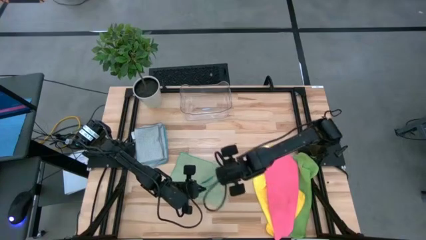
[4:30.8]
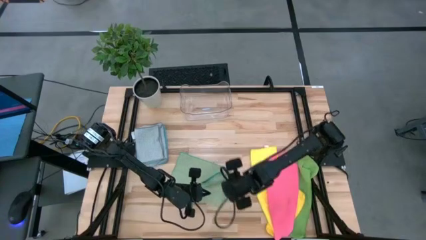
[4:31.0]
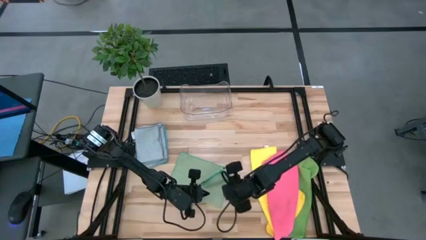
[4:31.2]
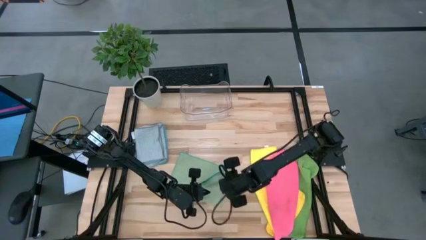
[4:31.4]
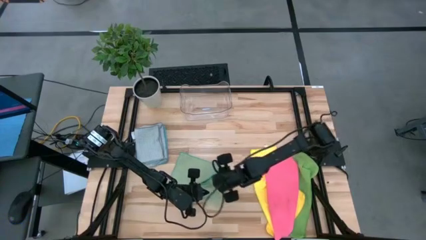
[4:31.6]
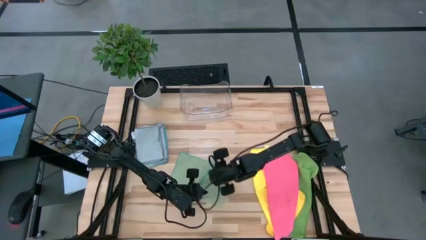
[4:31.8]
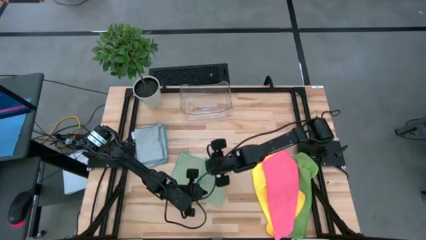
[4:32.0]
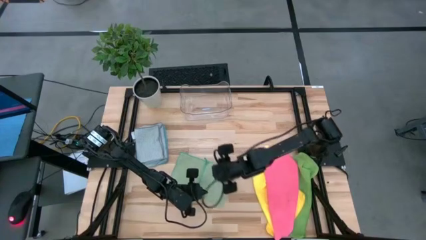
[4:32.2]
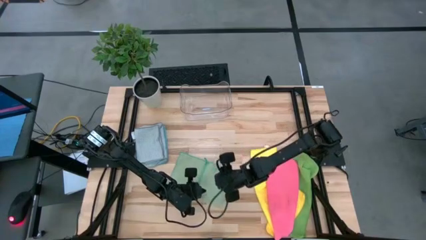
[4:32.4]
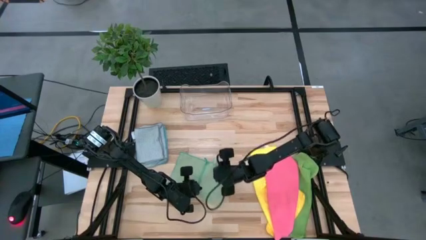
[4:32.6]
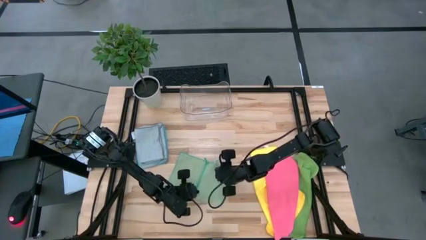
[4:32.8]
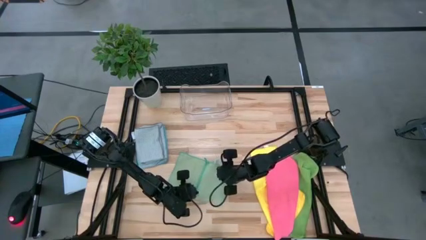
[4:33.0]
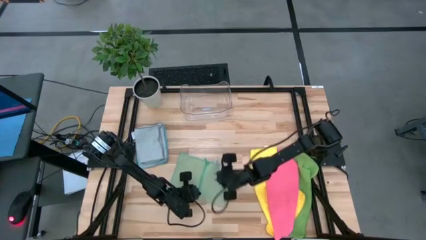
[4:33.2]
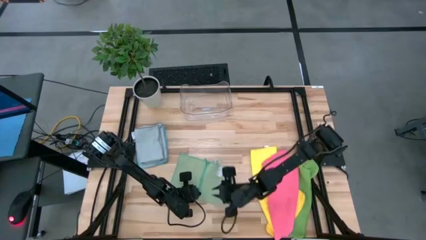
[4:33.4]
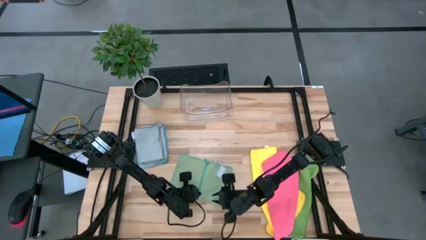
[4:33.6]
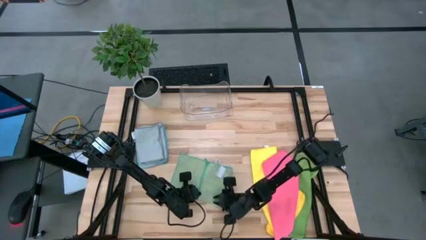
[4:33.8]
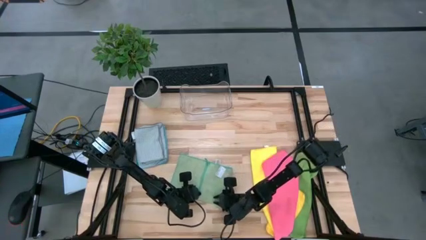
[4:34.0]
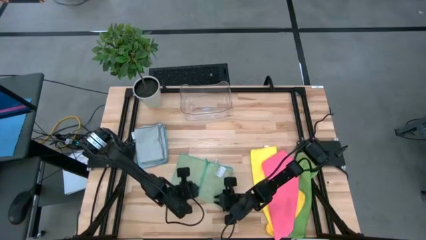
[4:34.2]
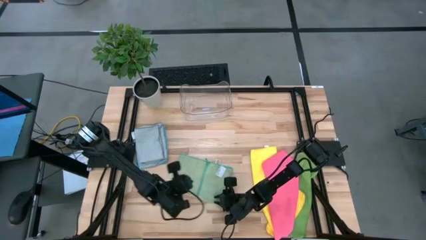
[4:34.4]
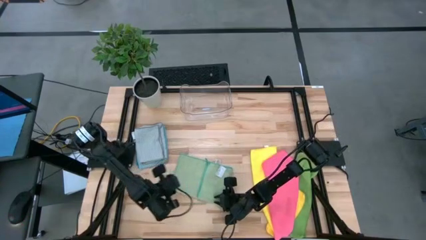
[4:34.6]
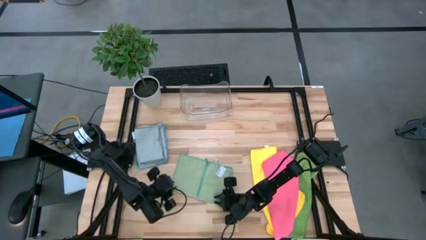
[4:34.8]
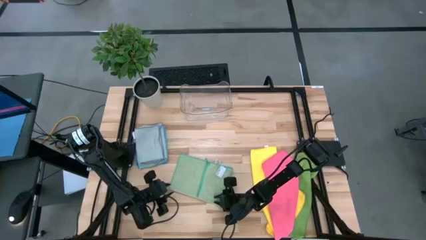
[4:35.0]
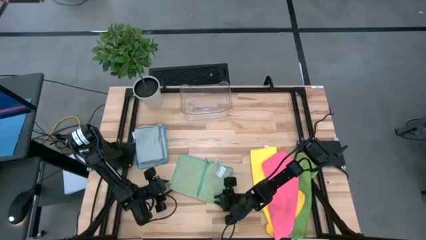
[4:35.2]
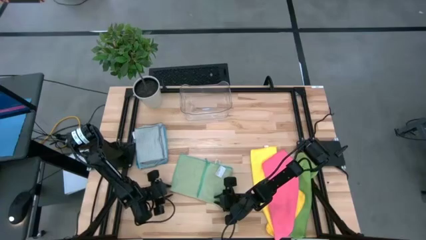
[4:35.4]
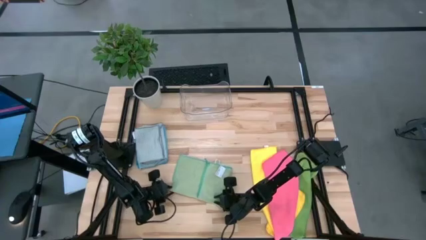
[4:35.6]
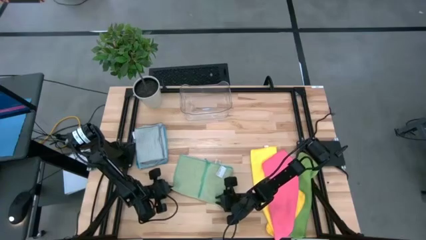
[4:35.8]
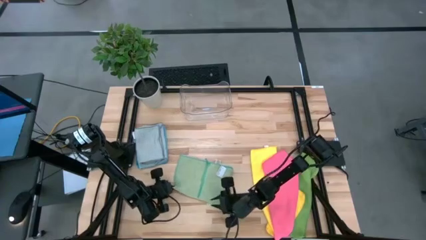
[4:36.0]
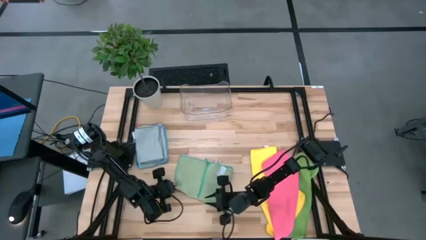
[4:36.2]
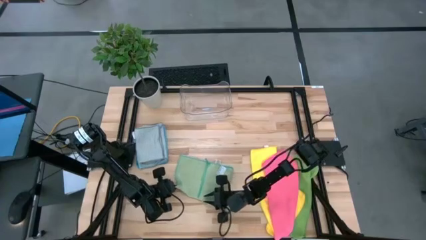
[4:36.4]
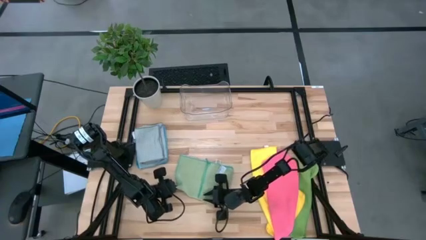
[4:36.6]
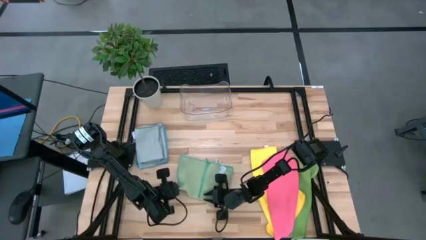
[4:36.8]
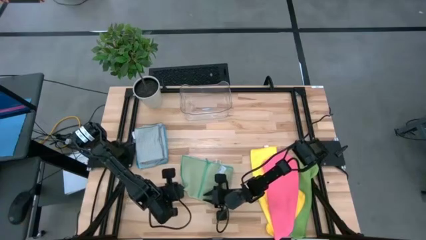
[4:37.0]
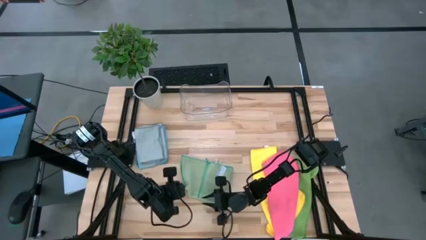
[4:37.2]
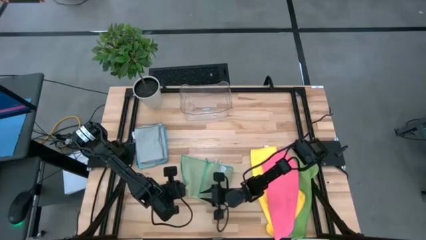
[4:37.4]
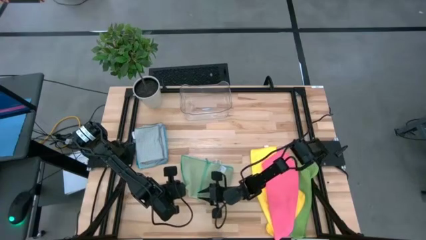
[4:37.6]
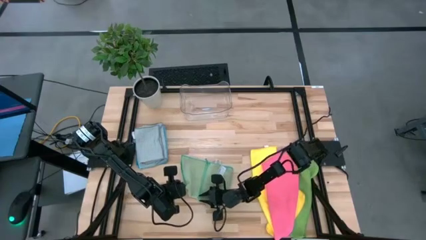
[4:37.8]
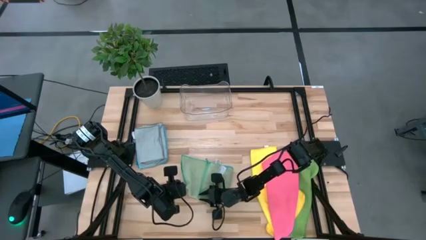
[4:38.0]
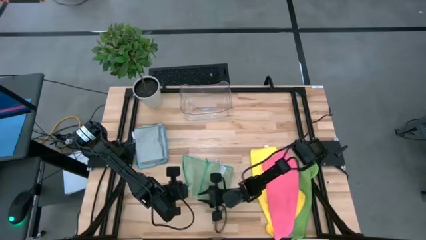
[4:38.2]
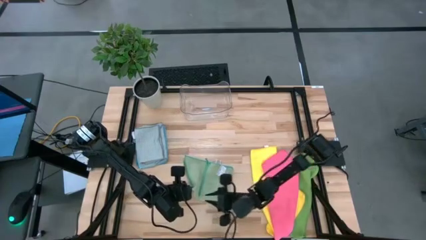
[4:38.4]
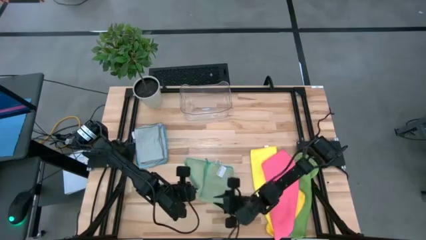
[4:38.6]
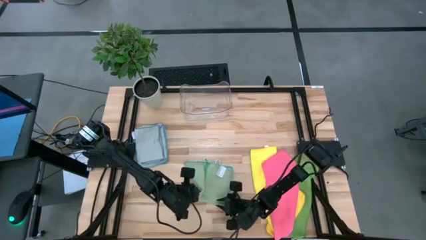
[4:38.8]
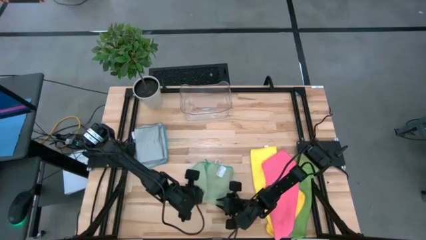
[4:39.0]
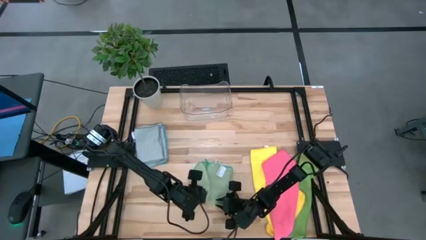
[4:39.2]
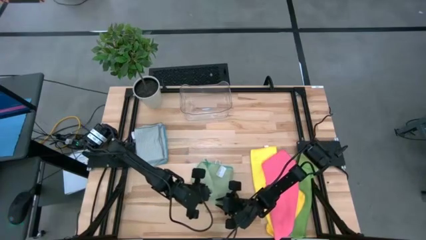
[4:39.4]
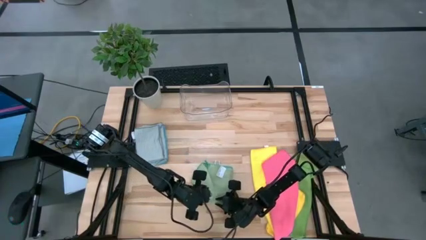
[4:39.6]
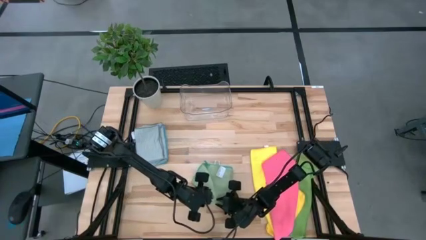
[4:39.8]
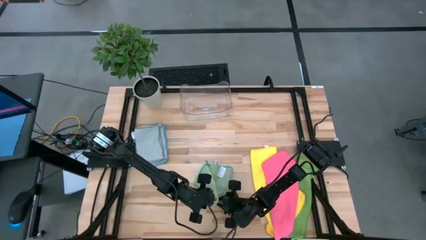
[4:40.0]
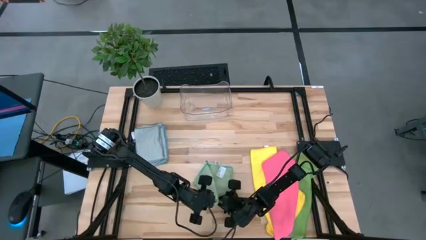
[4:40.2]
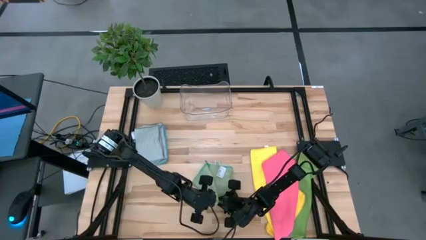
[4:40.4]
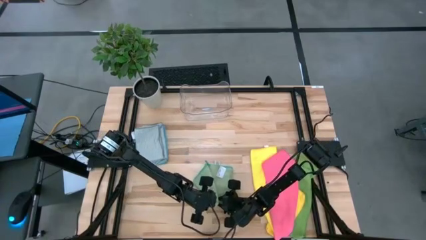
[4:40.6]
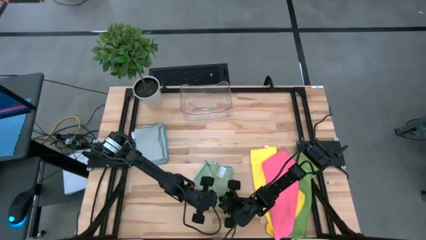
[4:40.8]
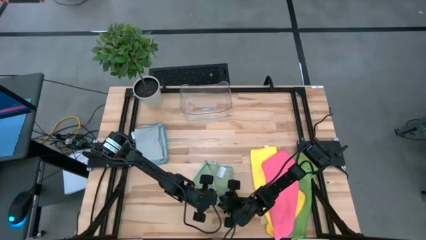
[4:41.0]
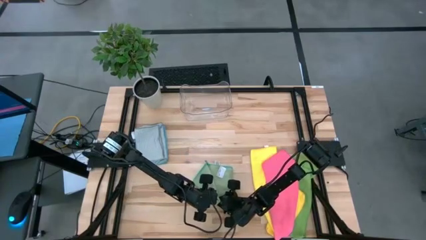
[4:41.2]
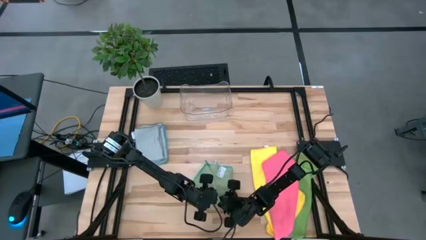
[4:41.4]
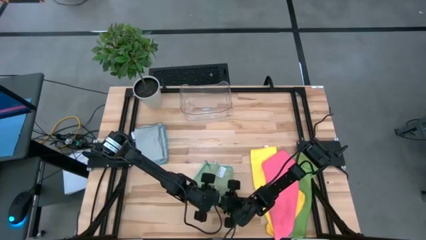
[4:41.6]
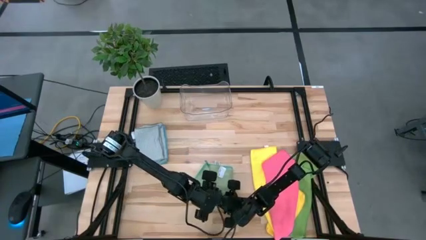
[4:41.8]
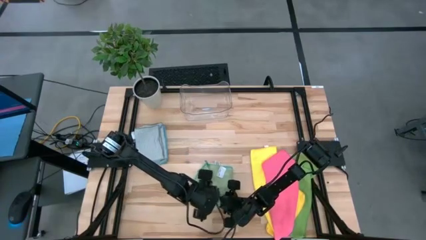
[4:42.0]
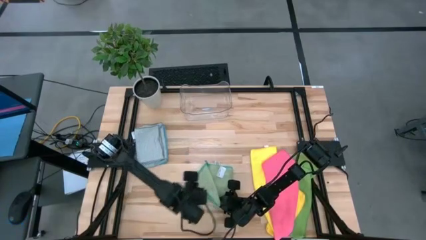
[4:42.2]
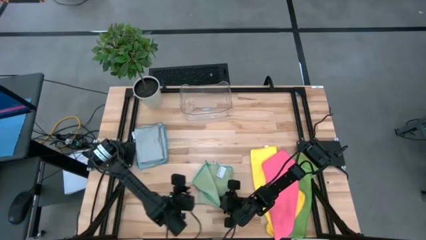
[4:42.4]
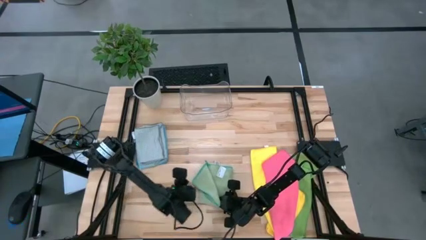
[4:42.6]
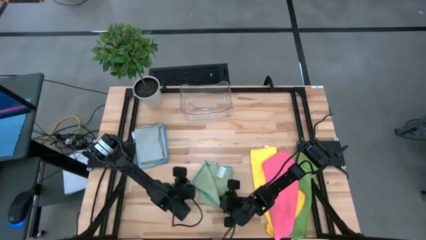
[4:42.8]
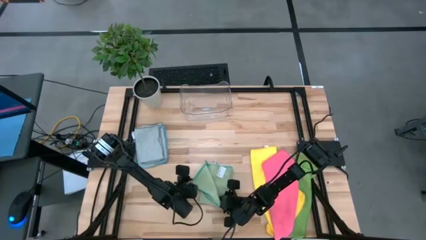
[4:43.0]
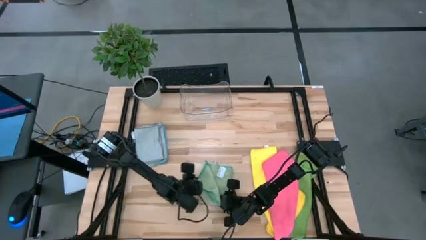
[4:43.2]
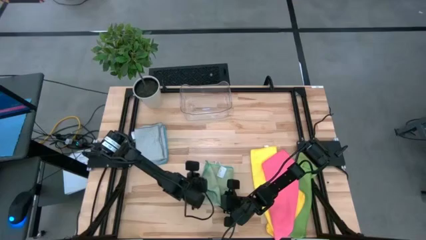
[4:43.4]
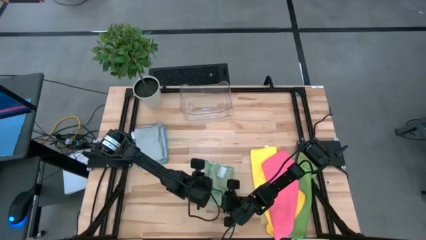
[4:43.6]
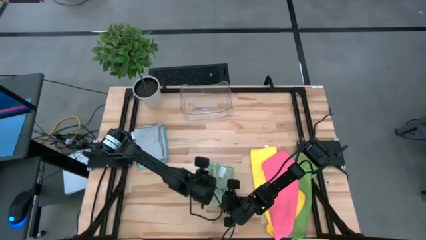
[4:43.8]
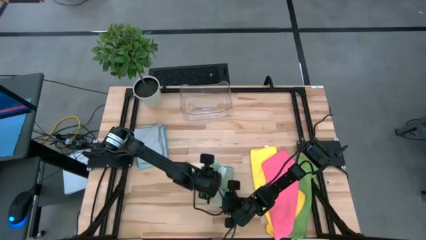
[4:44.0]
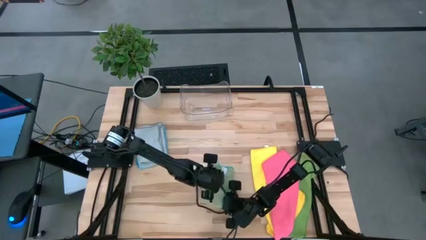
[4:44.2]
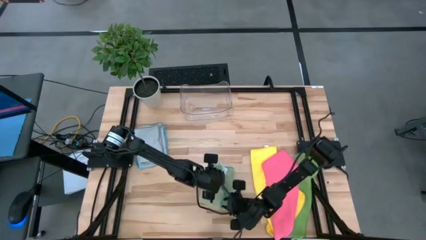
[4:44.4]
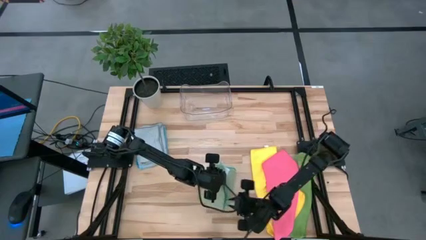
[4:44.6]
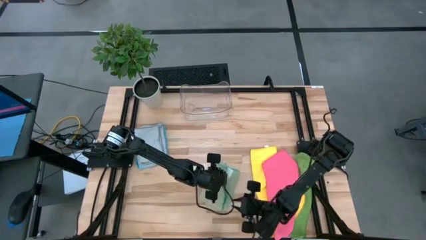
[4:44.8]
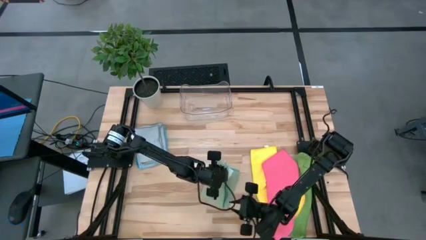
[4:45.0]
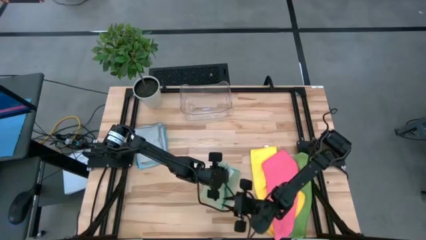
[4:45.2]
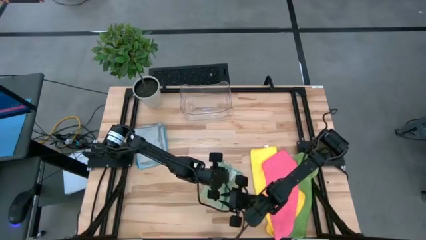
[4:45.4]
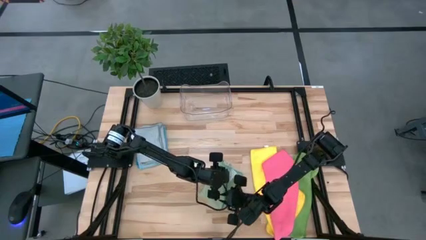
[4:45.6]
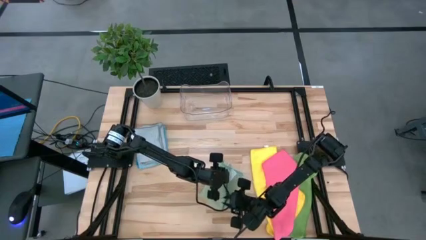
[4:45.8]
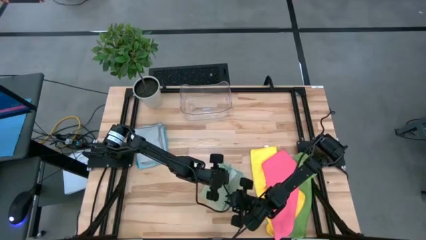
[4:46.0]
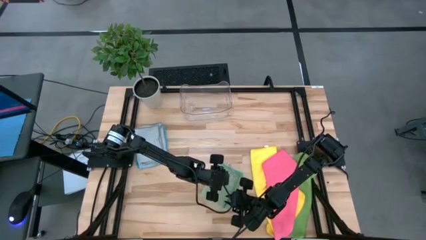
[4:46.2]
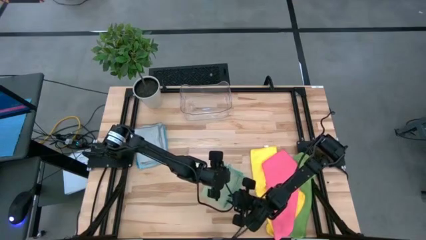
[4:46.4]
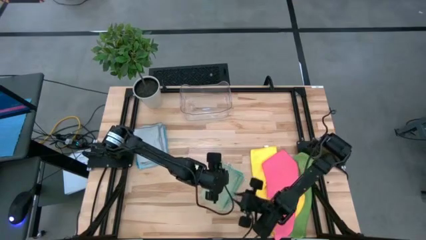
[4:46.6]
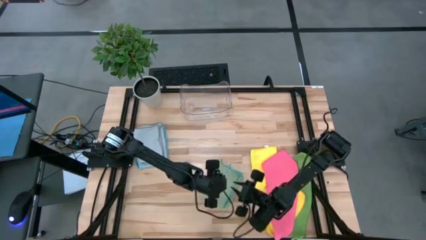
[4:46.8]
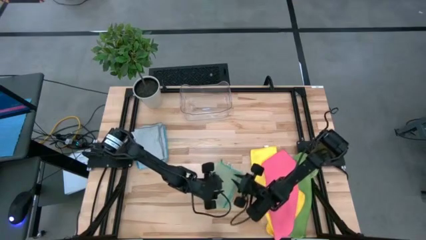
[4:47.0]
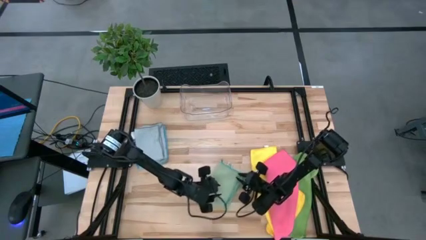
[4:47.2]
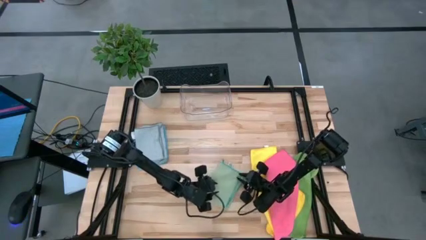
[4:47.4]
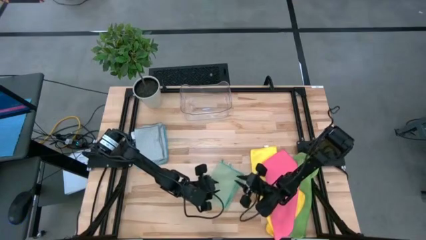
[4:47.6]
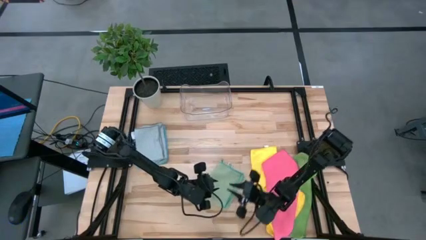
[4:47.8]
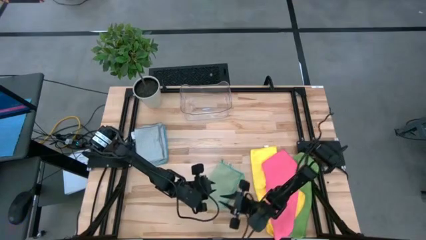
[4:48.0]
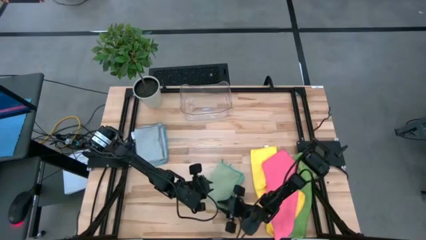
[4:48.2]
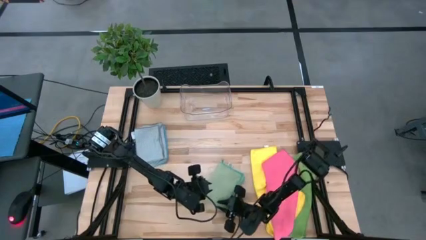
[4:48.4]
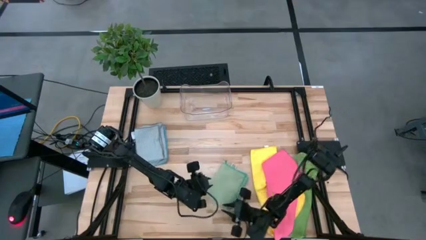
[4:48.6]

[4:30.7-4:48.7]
Task: Fold microfiber towels
Fold the light green microfiber cloth
